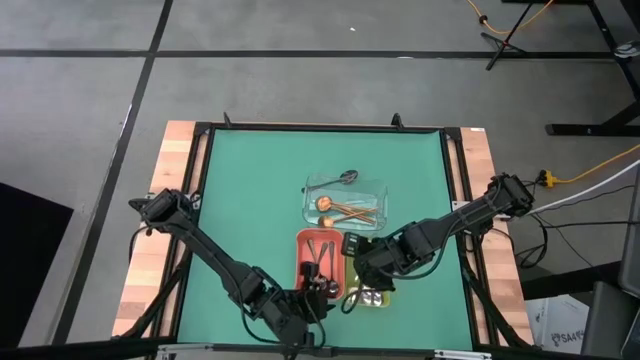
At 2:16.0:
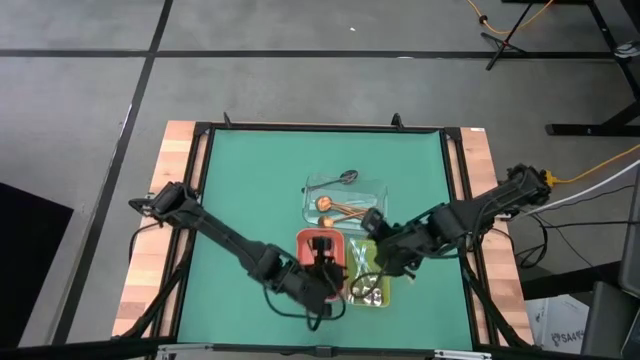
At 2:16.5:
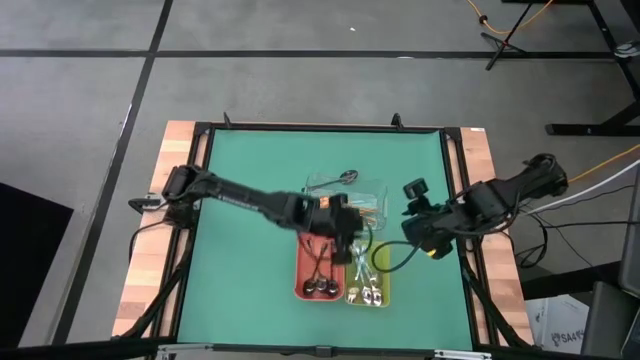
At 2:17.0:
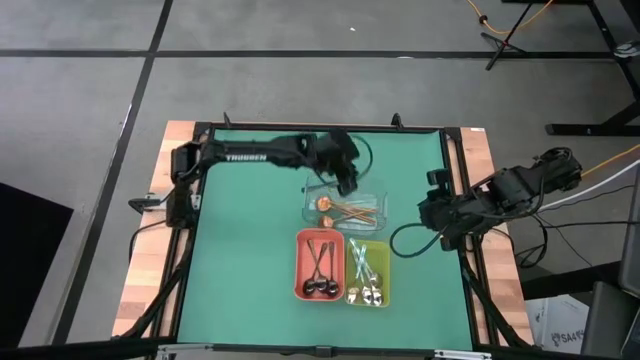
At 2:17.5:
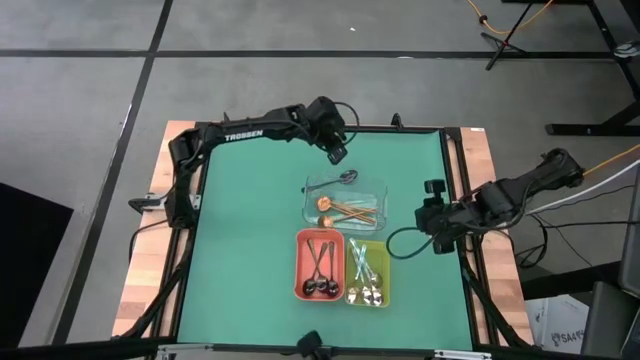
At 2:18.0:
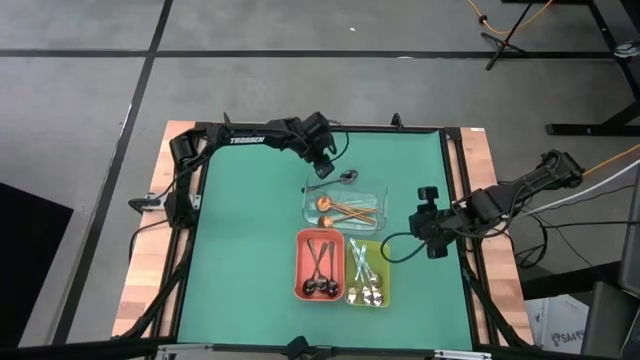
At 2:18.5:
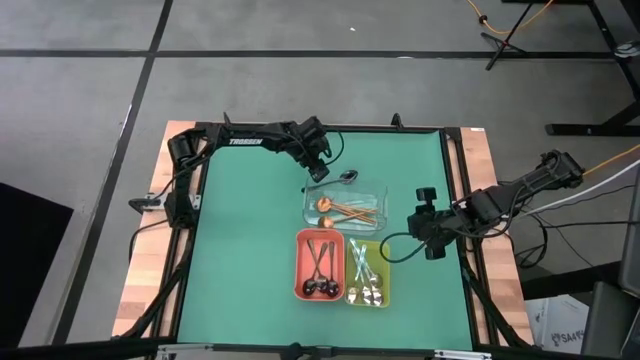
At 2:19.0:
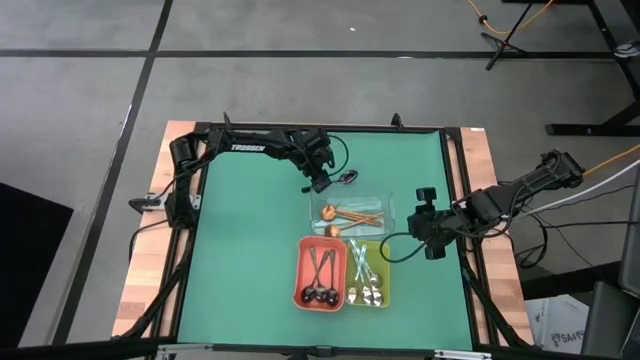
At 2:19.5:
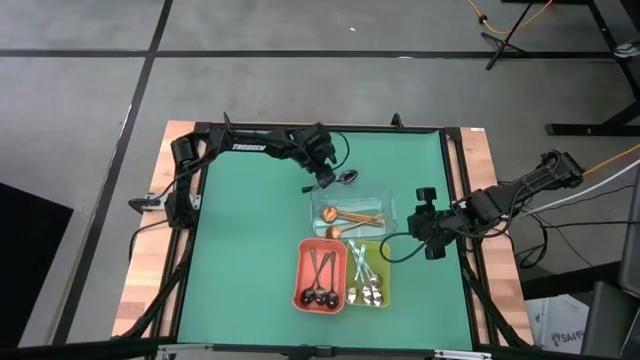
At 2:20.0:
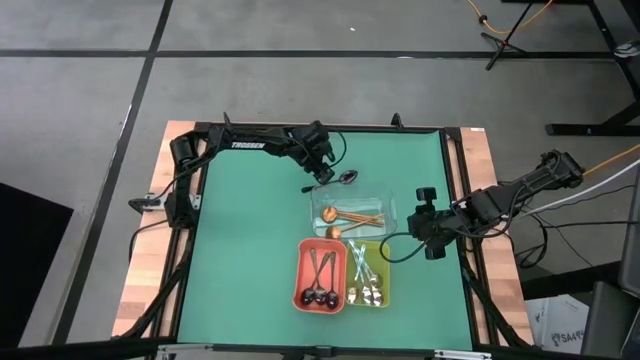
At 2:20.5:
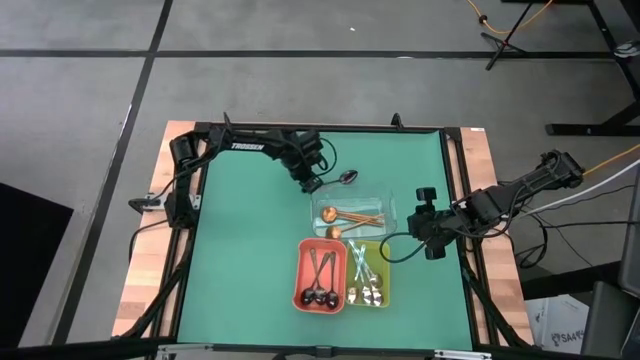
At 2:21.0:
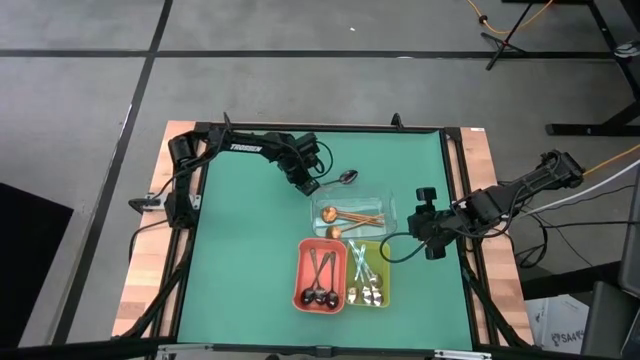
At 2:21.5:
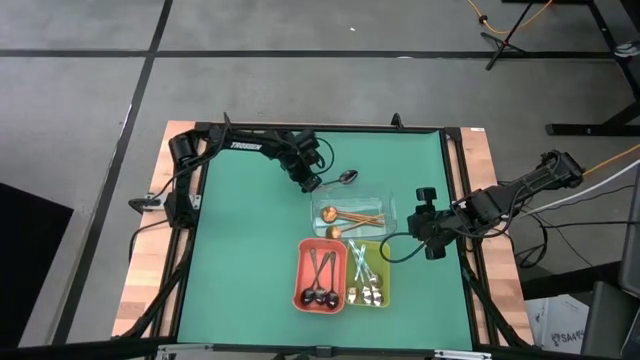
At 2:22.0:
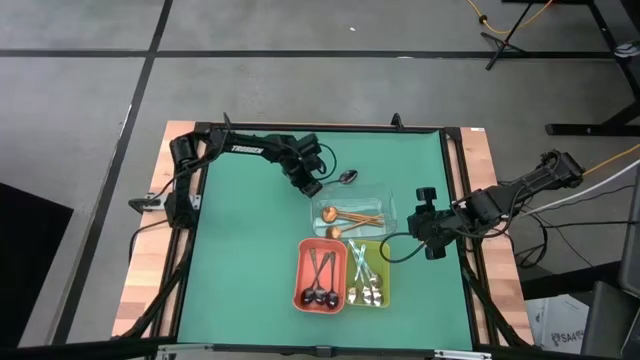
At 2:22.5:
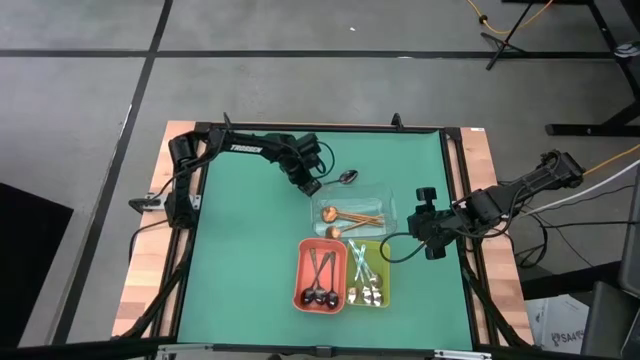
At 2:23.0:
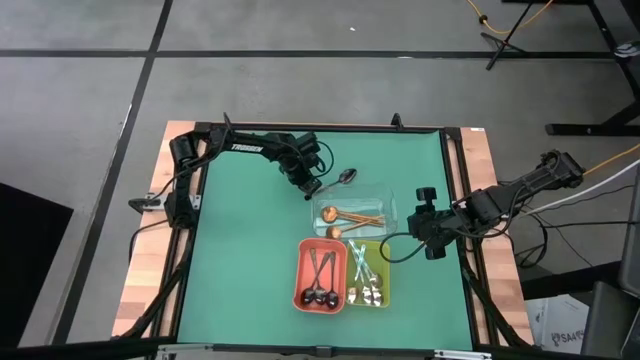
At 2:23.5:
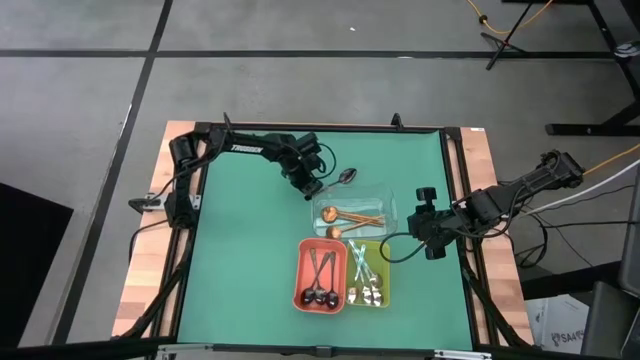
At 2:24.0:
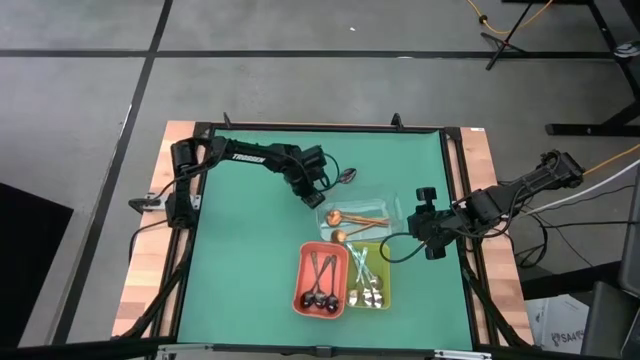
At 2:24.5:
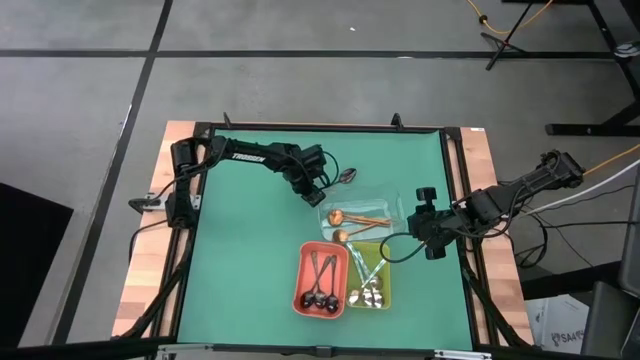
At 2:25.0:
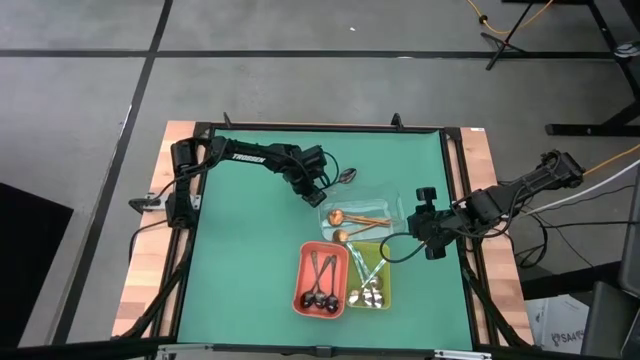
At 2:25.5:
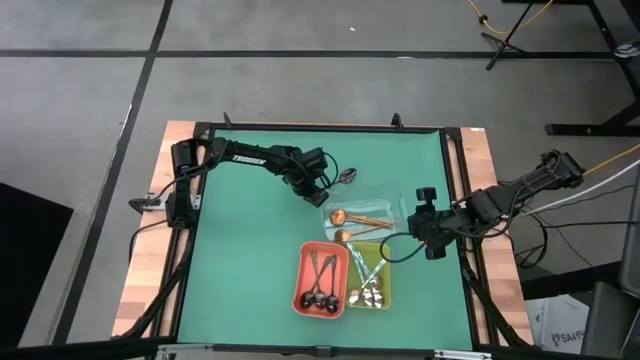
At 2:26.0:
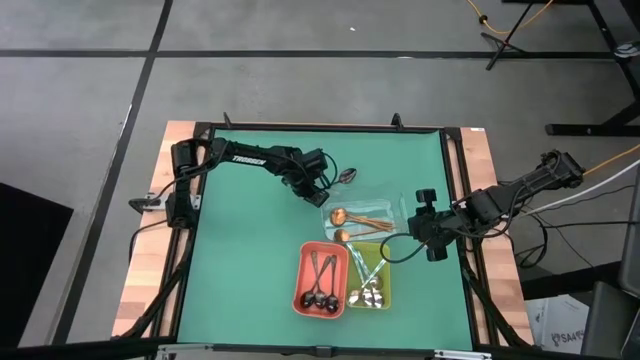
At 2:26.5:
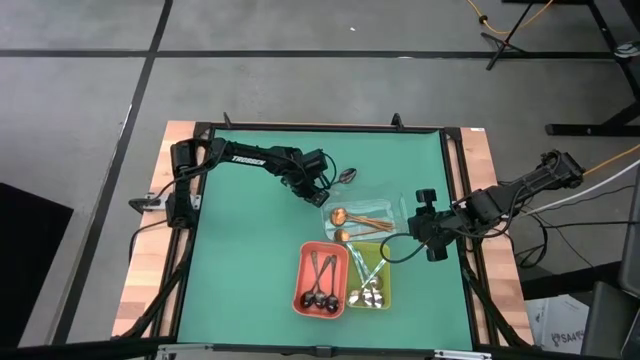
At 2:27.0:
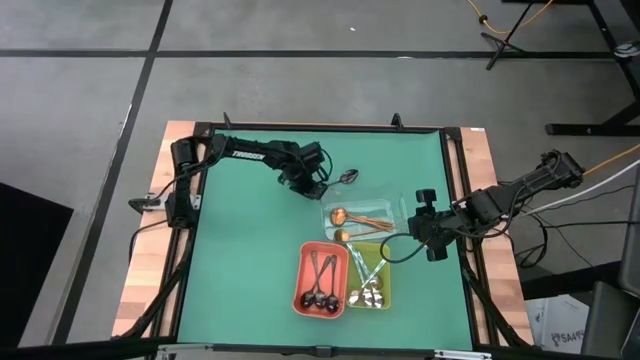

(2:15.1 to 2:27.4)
Task: Sort silverware by color (type)
Put the black spoon into the orange bin

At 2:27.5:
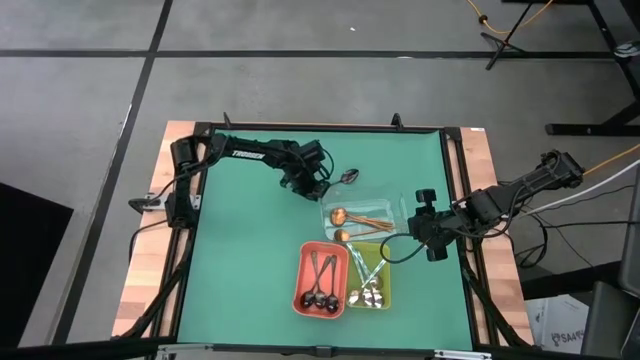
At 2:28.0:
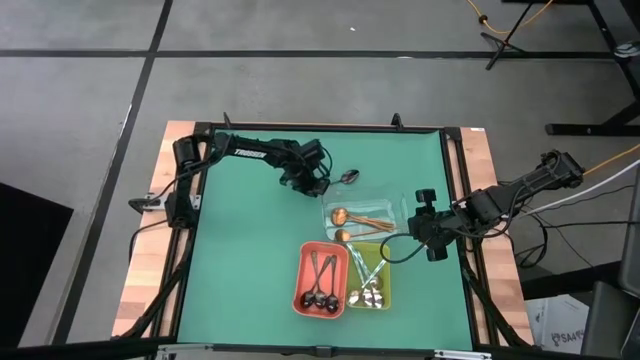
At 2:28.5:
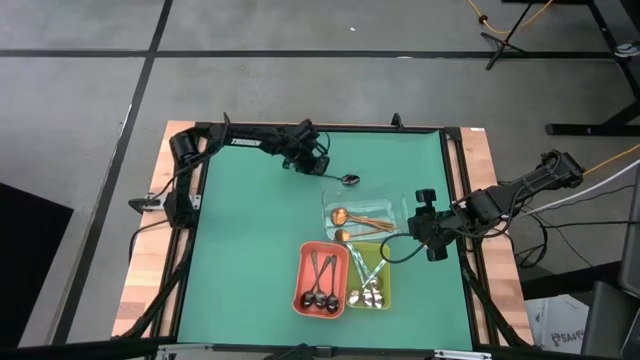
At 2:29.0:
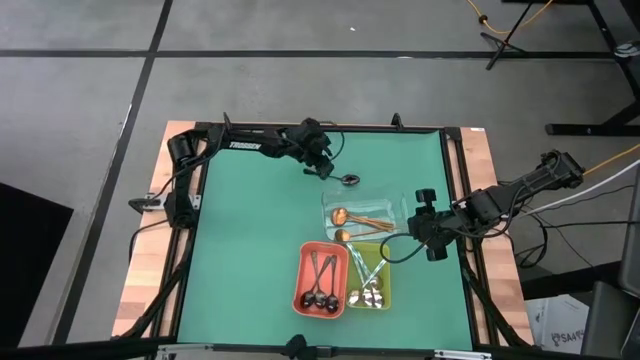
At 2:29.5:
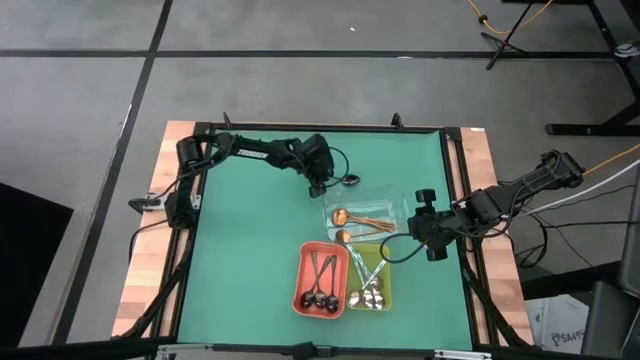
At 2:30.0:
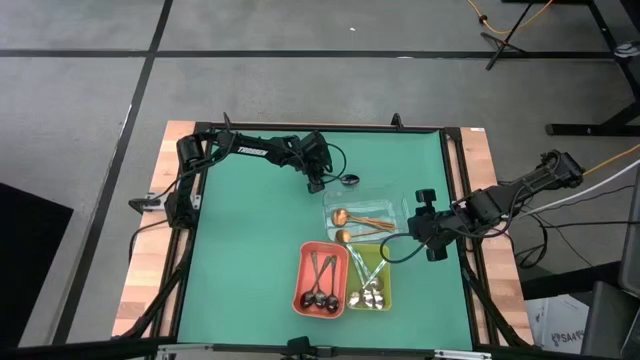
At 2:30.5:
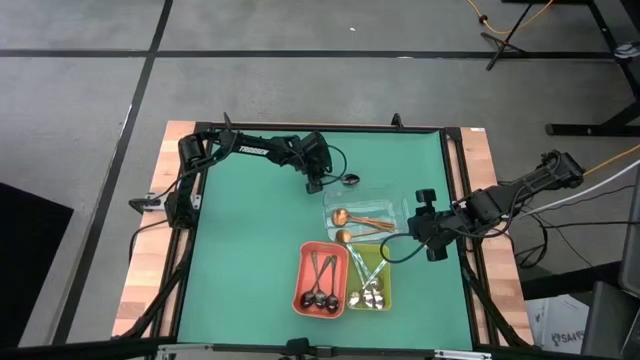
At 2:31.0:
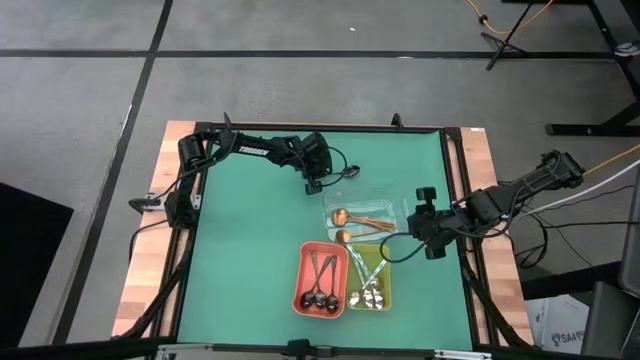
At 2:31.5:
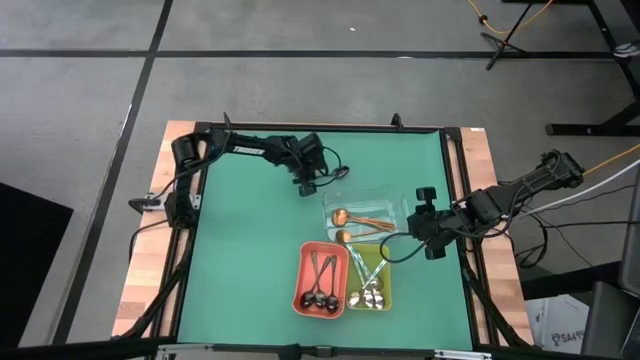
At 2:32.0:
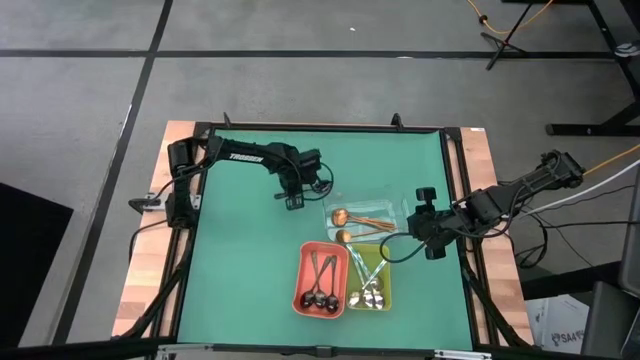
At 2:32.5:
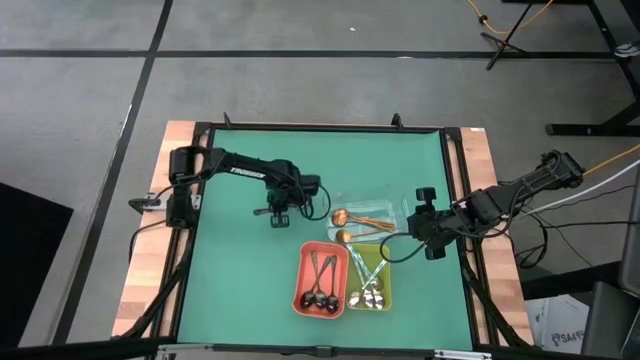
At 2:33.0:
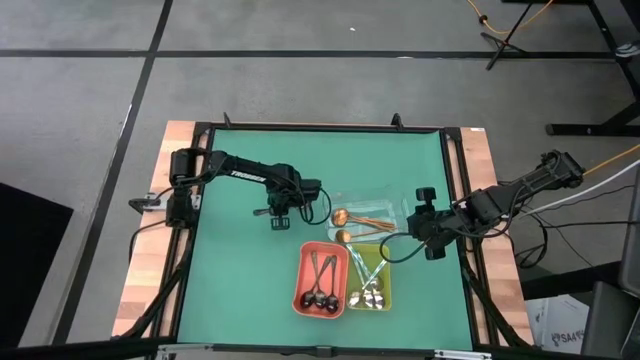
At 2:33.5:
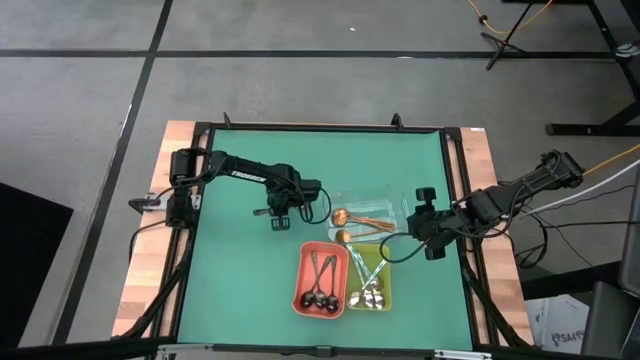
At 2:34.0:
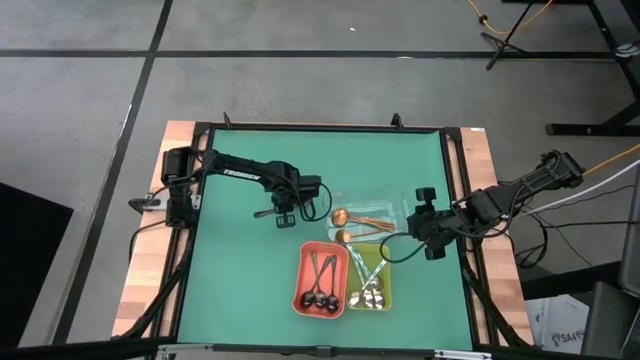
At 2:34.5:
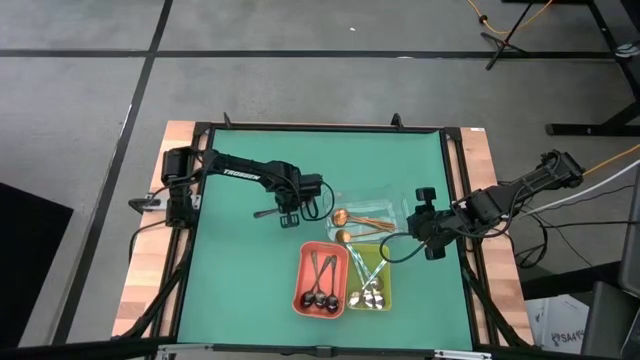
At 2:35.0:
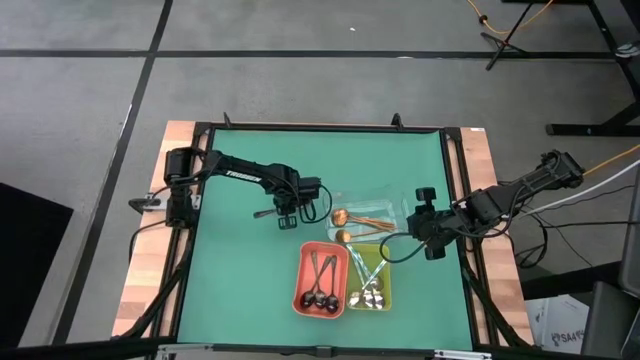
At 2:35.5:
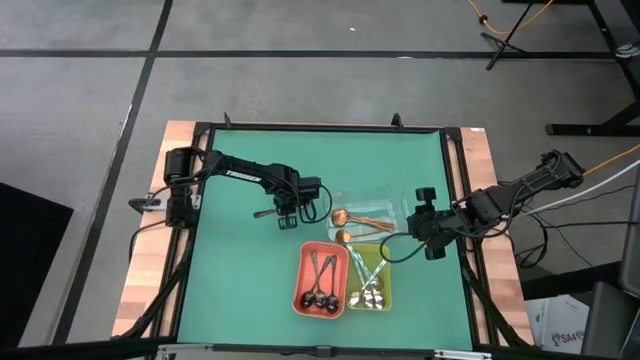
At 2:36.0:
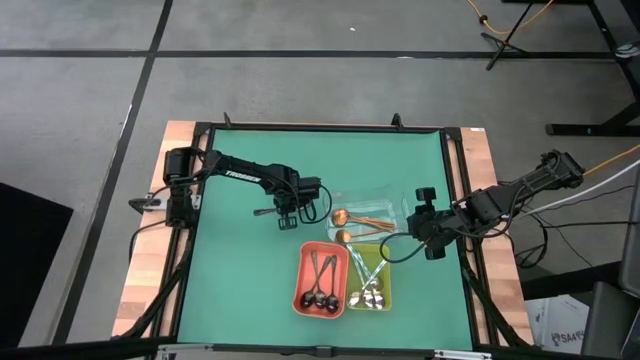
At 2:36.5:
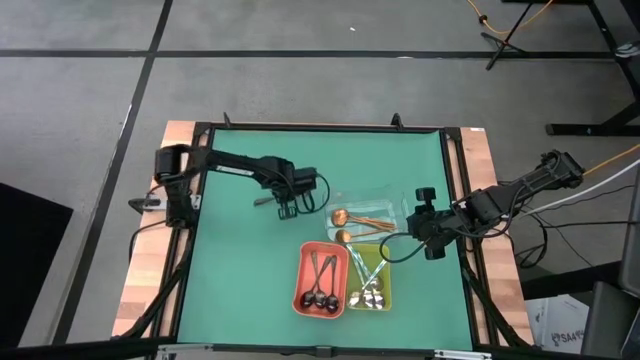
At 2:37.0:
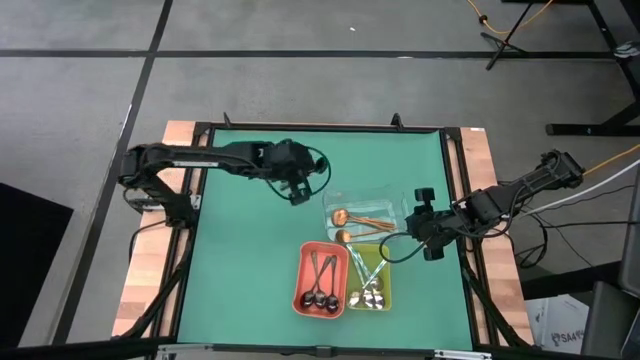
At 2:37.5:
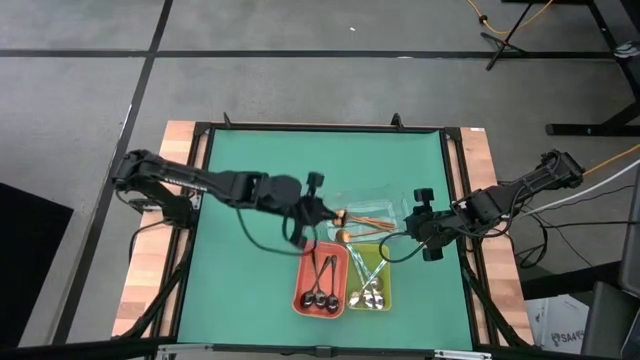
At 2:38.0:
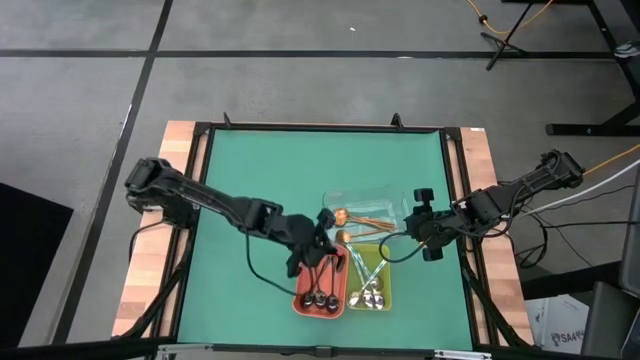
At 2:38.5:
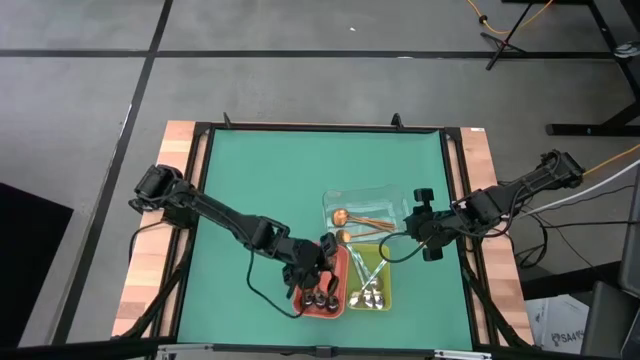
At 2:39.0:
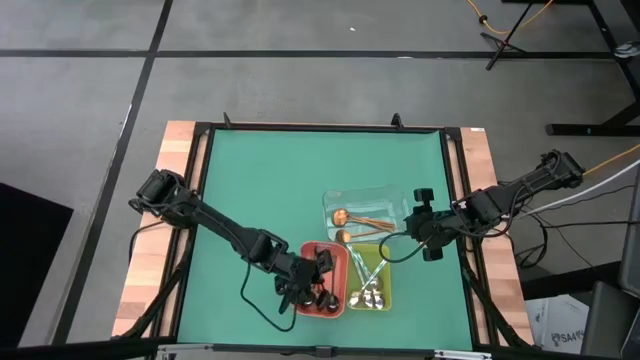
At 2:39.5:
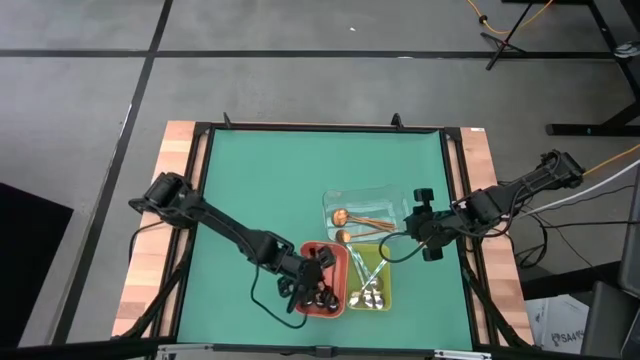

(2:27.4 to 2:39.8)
Put the black spoon into the orange bin
